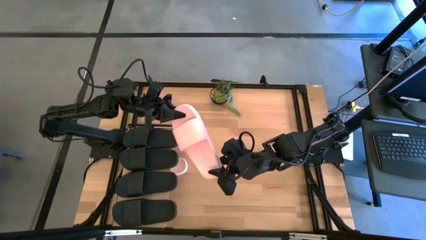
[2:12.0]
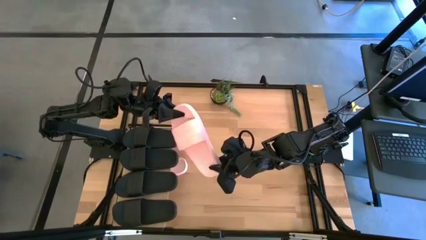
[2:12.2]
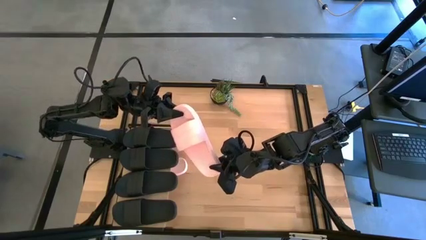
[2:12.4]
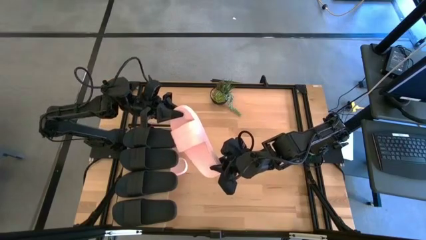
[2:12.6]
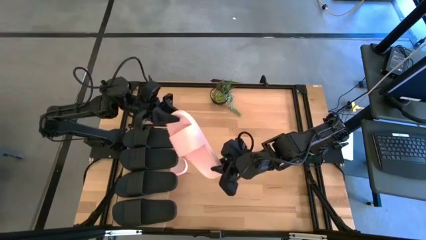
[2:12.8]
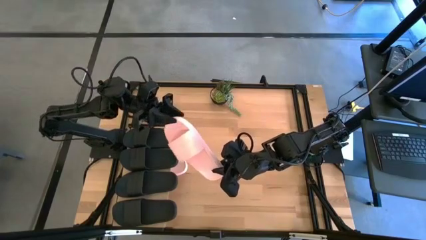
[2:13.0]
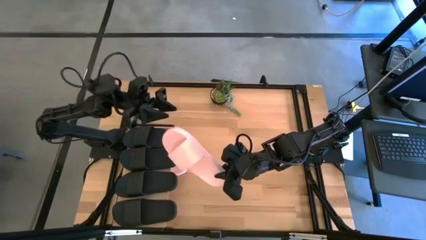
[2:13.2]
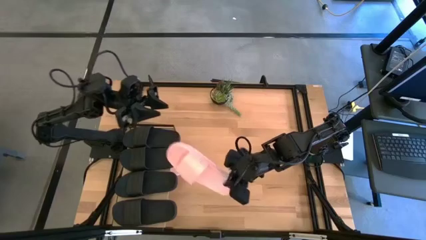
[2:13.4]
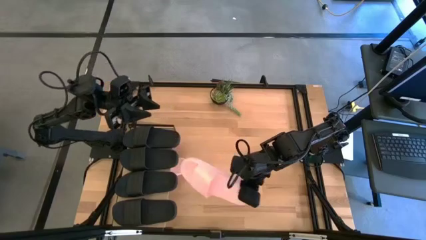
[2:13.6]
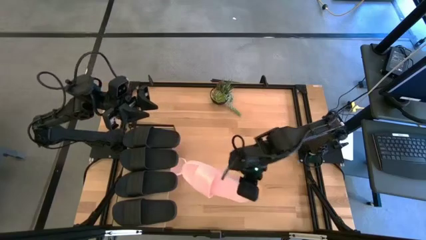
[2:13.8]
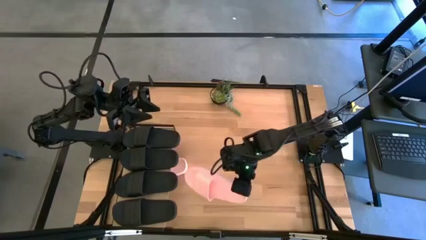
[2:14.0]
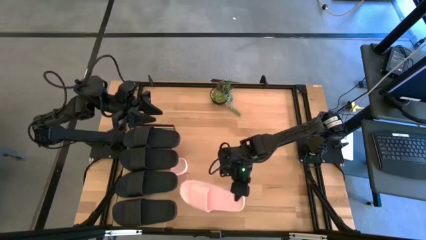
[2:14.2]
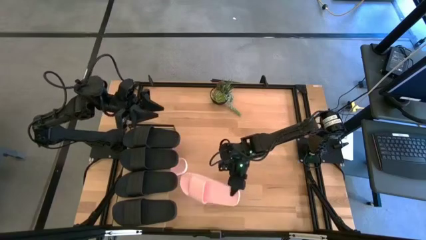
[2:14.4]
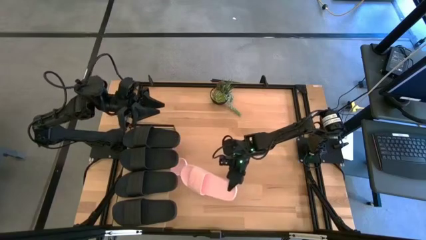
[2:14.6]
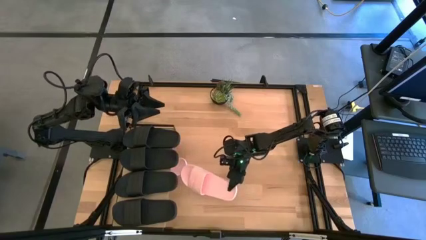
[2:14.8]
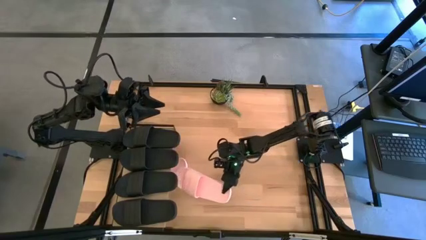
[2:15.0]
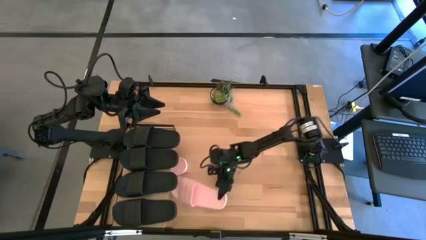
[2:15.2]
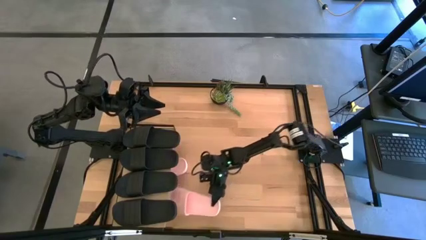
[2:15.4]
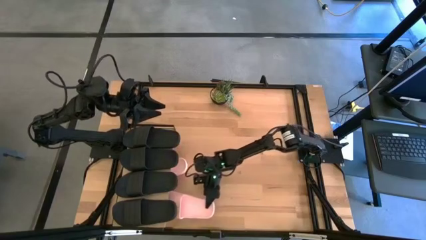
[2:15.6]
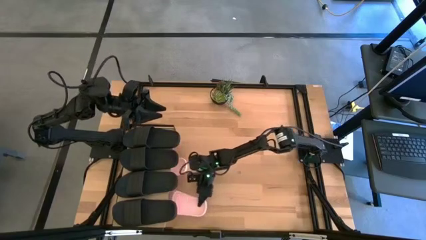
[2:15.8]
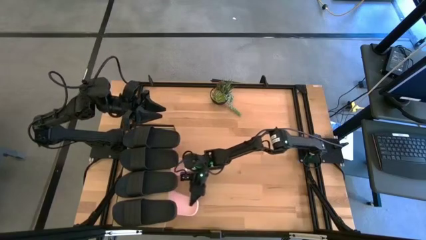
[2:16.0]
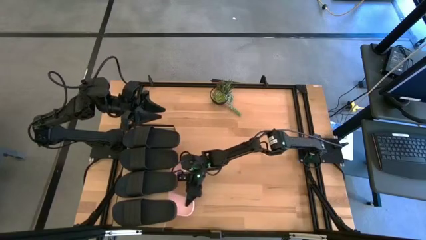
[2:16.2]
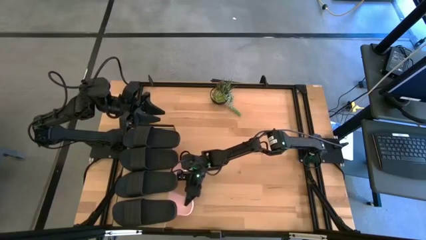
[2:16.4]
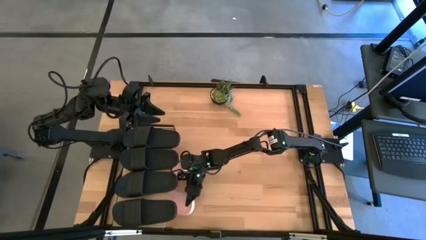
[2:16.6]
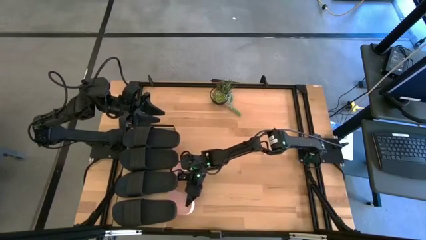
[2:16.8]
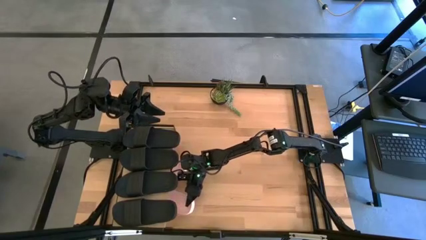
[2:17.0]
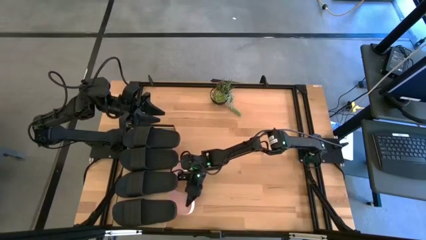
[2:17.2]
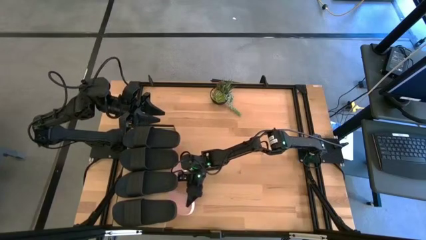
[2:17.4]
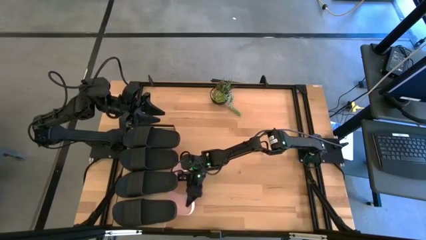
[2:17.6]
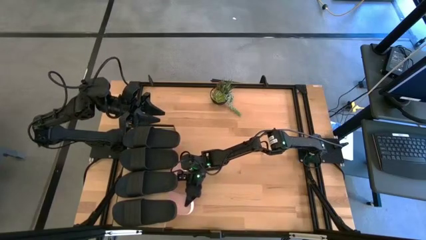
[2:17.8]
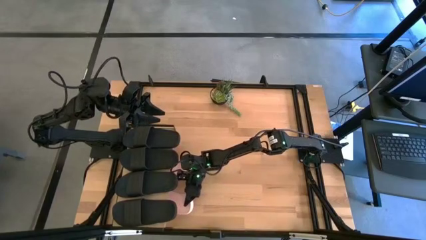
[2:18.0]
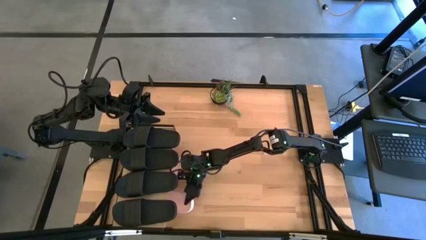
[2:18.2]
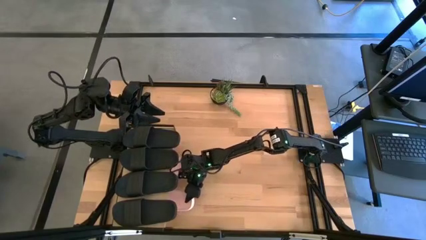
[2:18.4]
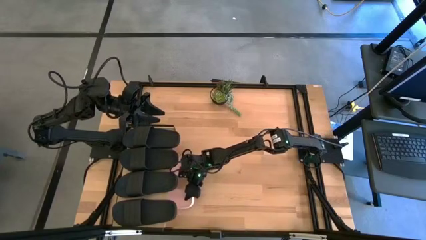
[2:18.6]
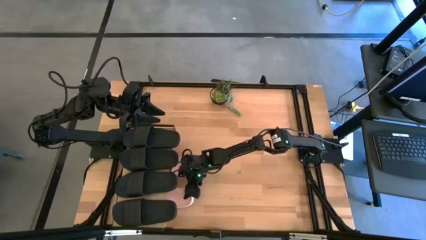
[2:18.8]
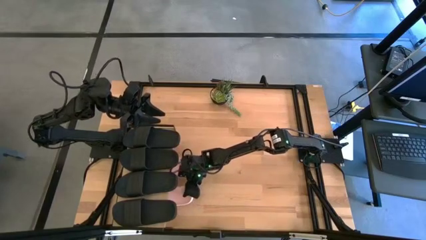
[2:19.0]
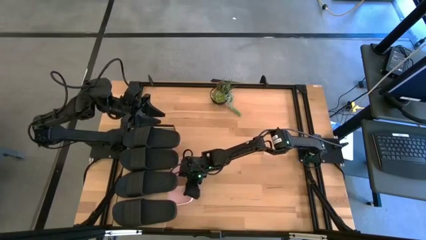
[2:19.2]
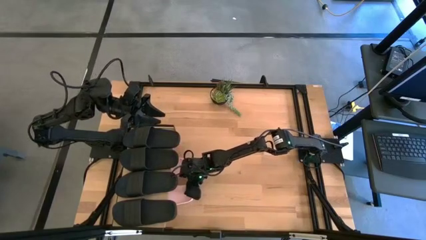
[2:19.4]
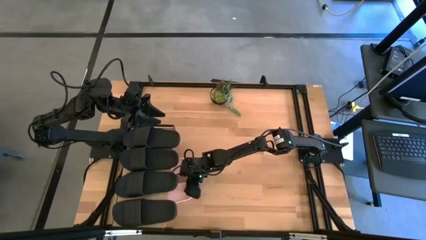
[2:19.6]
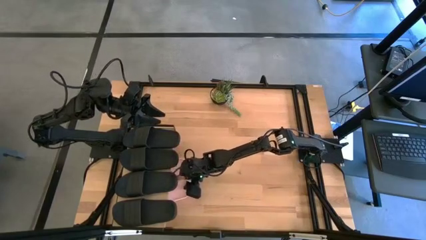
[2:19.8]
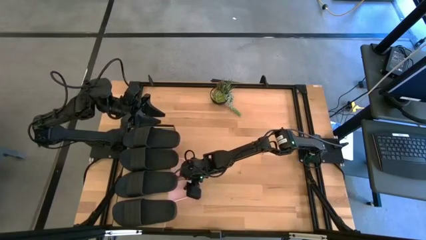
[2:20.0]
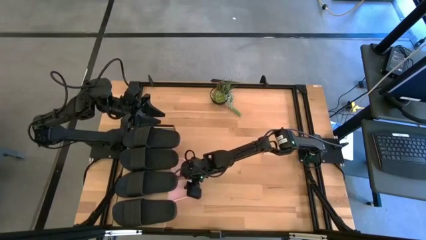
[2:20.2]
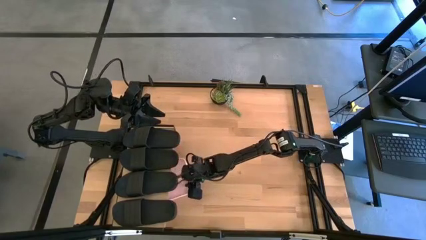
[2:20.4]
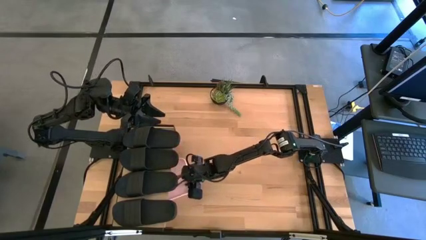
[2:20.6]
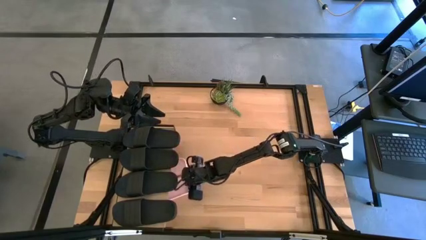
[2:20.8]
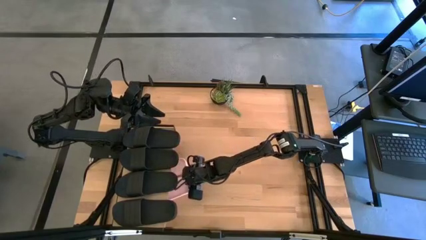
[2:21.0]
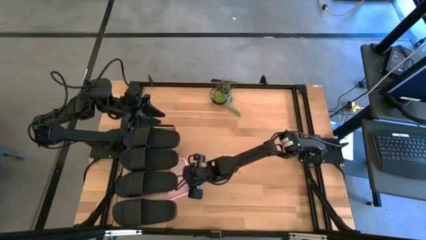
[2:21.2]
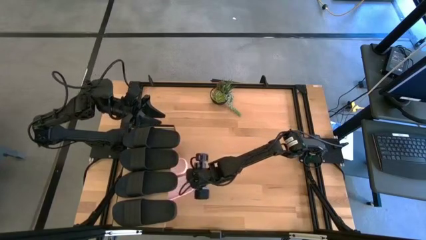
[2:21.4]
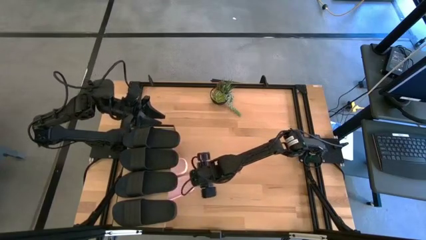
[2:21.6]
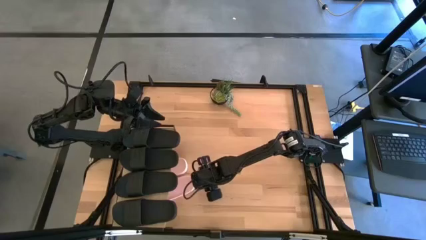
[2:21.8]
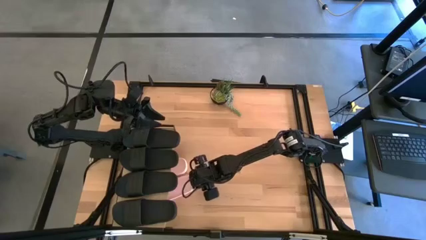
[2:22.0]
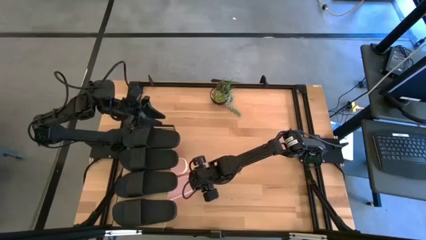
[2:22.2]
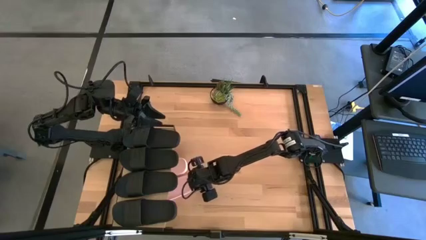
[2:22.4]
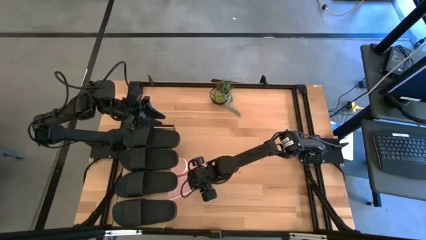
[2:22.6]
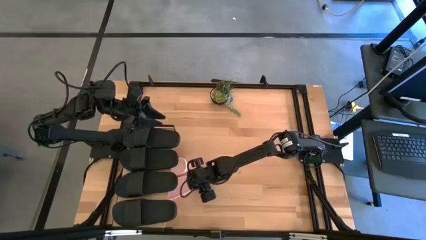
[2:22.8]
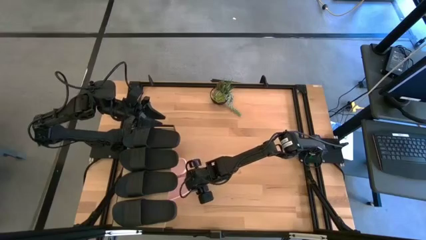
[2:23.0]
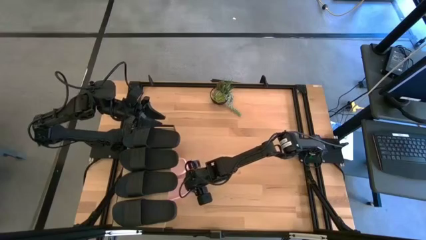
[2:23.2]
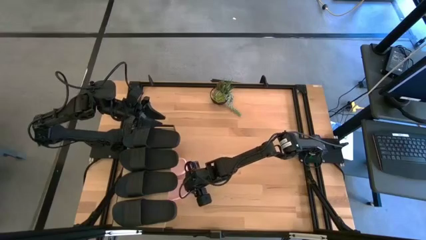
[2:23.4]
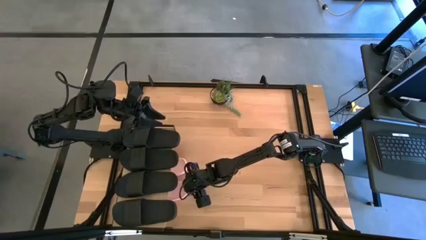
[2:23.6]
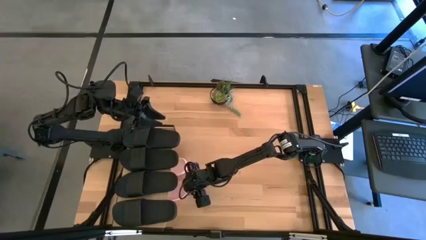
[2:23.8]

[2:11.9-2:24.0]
Task: Pick and place slides into the shelf
Put the pink slipper under the shelf
